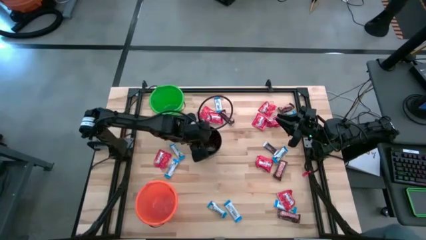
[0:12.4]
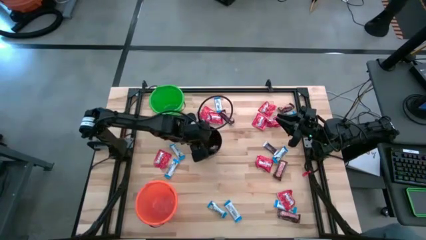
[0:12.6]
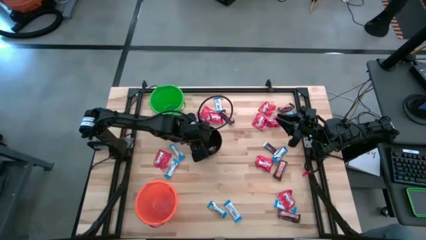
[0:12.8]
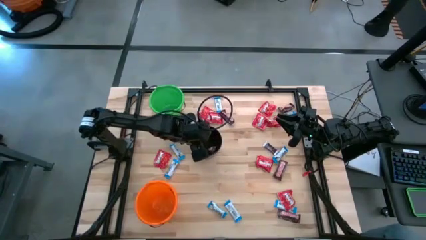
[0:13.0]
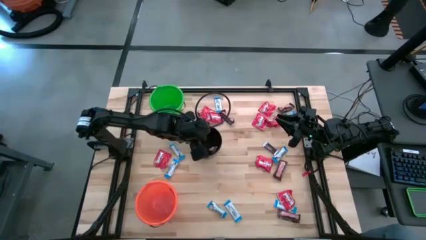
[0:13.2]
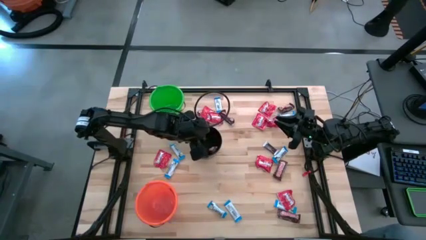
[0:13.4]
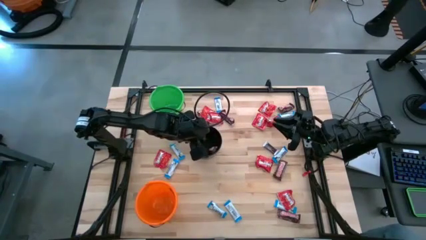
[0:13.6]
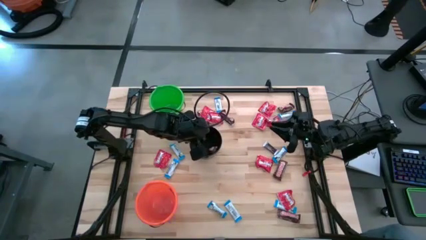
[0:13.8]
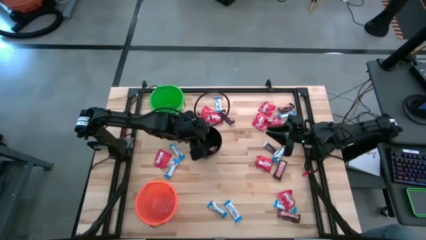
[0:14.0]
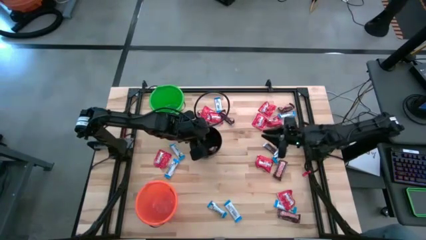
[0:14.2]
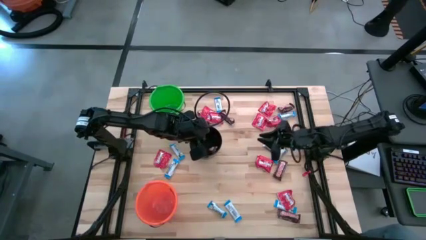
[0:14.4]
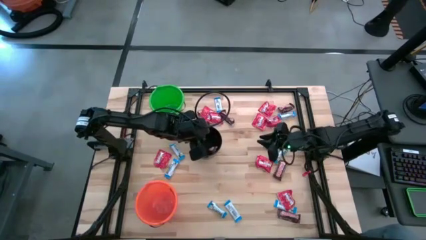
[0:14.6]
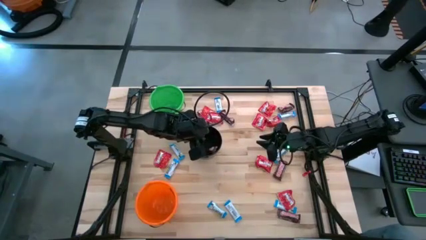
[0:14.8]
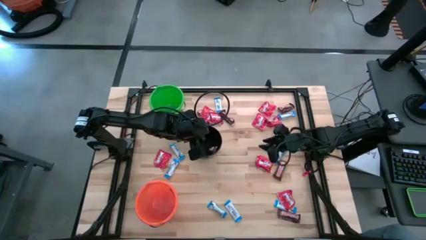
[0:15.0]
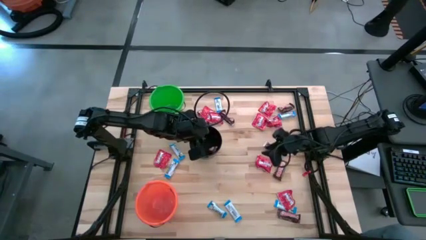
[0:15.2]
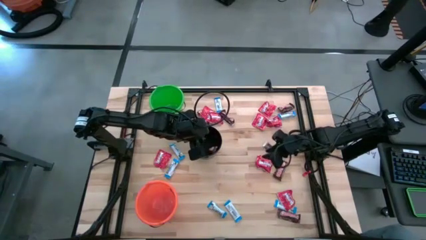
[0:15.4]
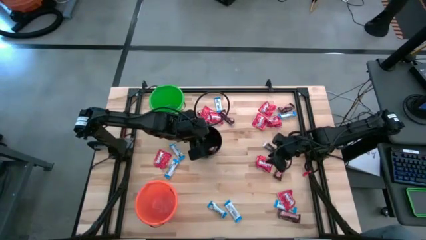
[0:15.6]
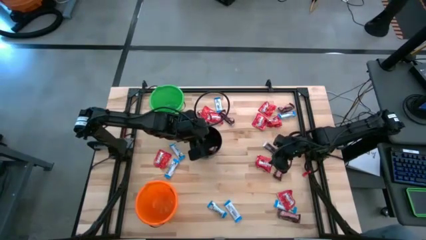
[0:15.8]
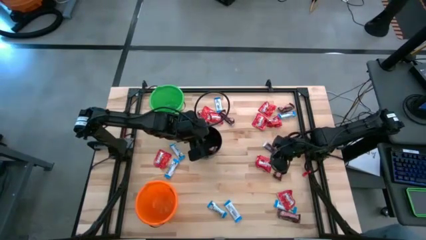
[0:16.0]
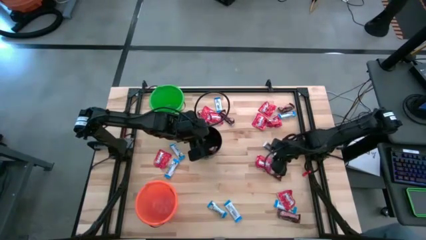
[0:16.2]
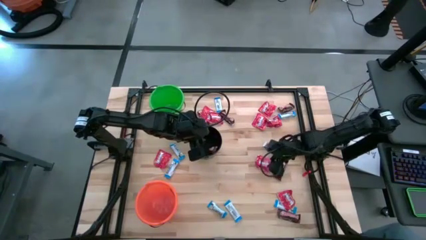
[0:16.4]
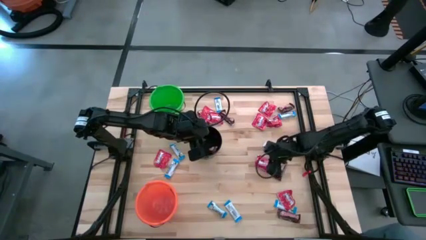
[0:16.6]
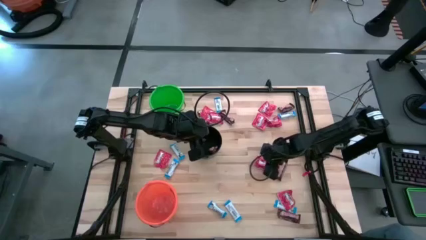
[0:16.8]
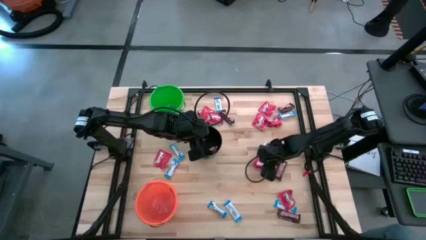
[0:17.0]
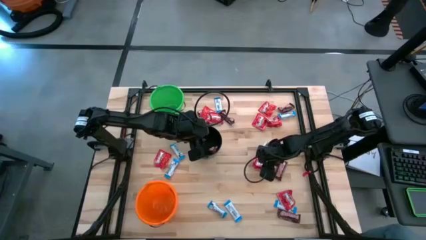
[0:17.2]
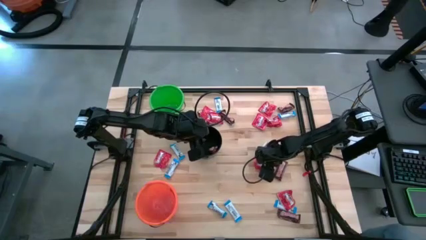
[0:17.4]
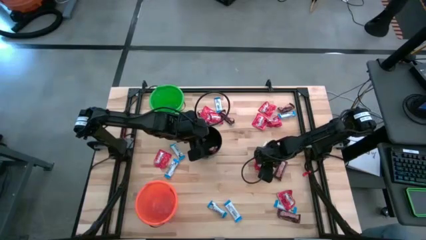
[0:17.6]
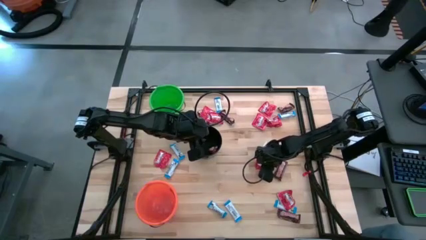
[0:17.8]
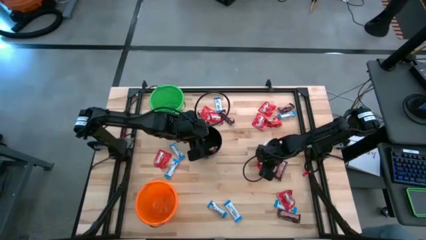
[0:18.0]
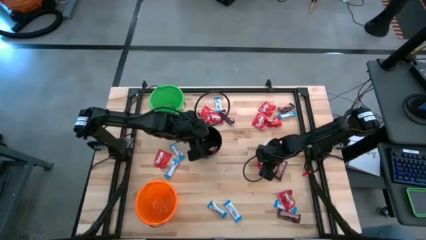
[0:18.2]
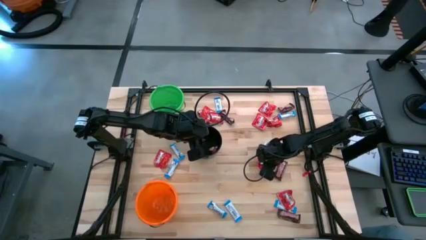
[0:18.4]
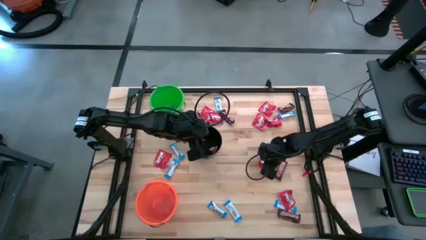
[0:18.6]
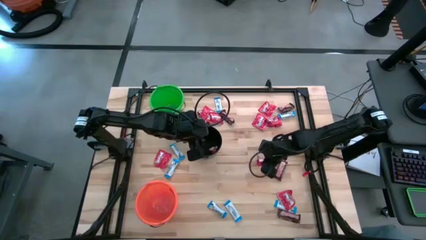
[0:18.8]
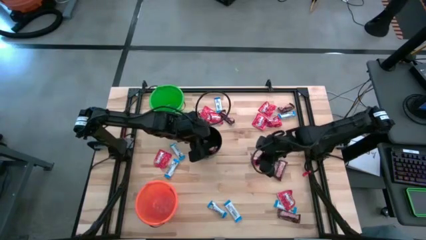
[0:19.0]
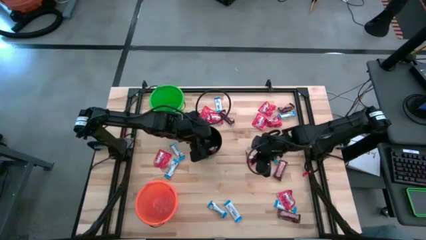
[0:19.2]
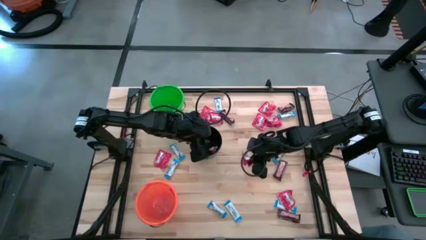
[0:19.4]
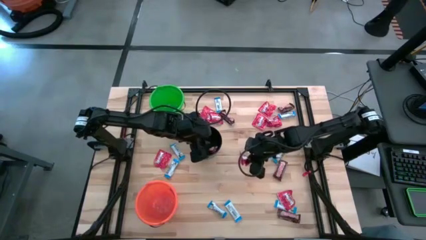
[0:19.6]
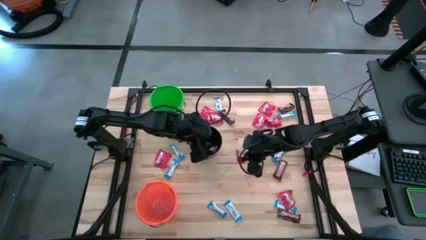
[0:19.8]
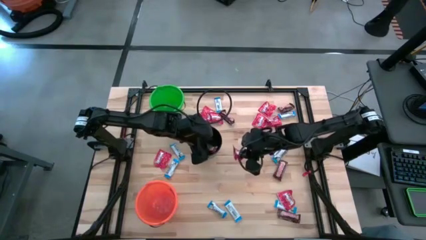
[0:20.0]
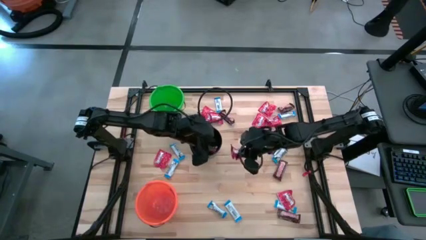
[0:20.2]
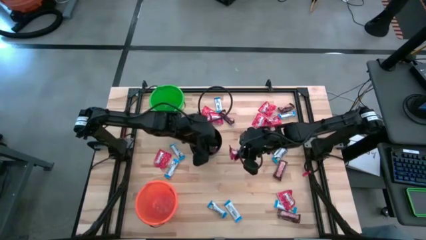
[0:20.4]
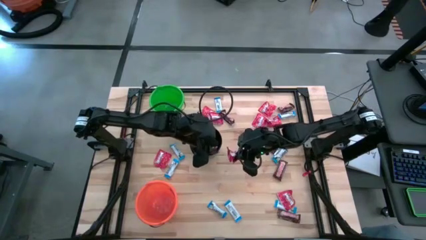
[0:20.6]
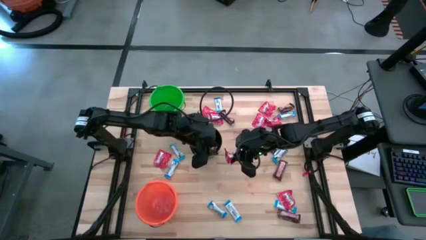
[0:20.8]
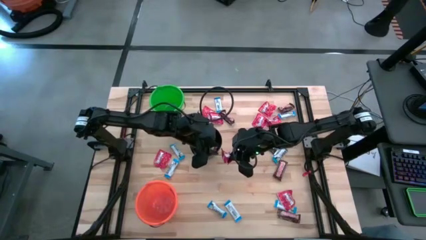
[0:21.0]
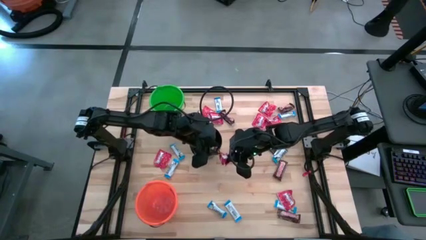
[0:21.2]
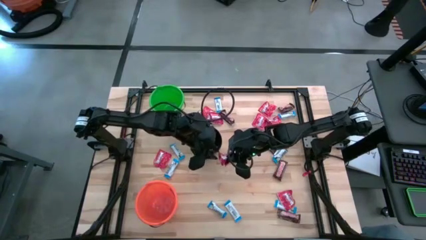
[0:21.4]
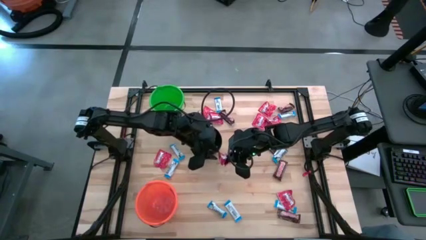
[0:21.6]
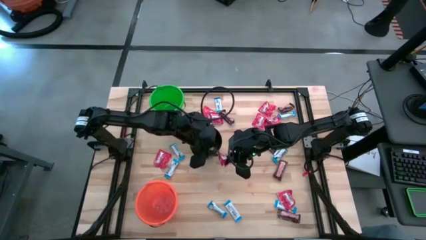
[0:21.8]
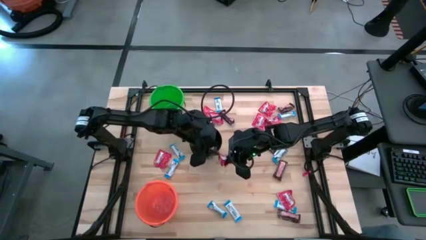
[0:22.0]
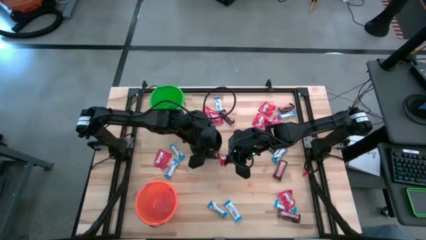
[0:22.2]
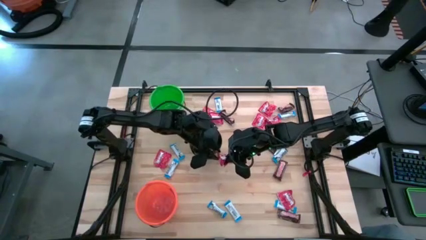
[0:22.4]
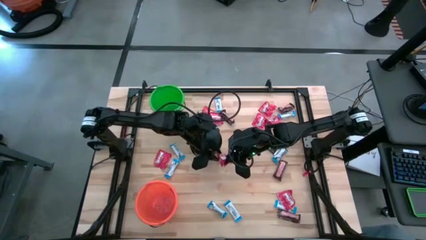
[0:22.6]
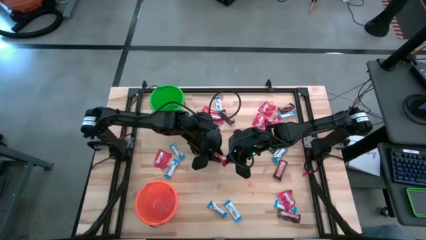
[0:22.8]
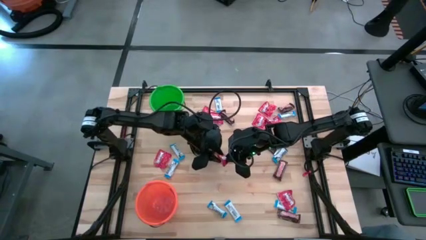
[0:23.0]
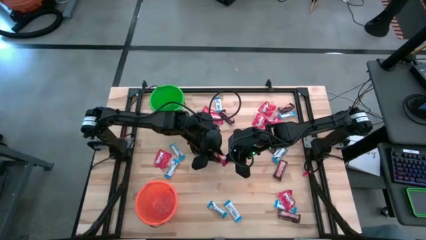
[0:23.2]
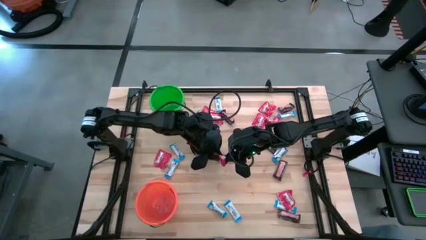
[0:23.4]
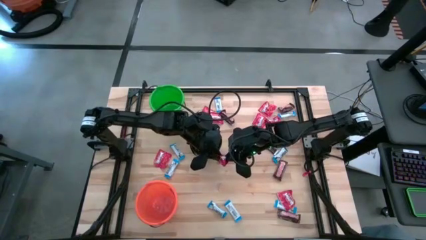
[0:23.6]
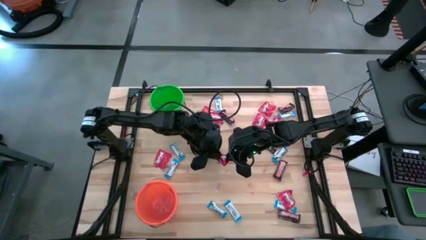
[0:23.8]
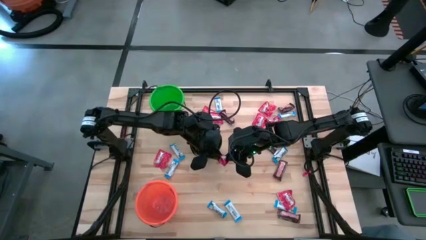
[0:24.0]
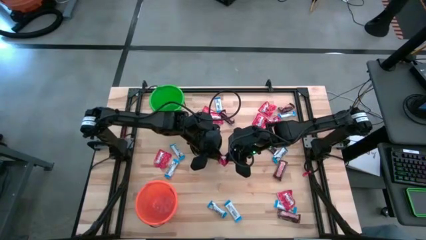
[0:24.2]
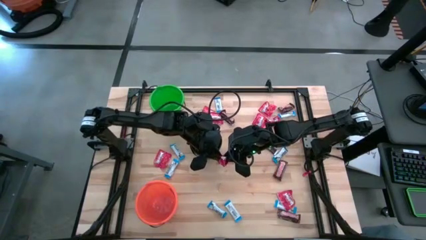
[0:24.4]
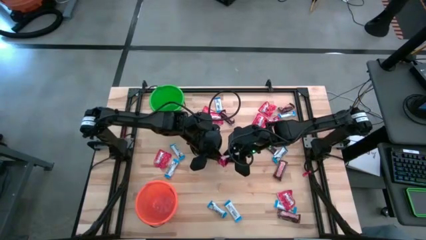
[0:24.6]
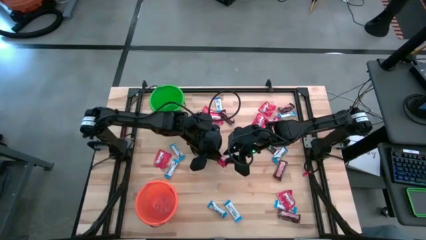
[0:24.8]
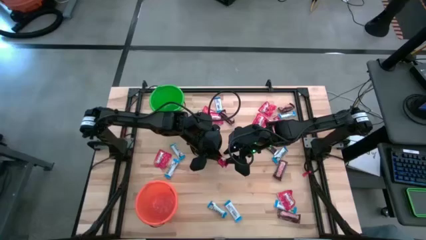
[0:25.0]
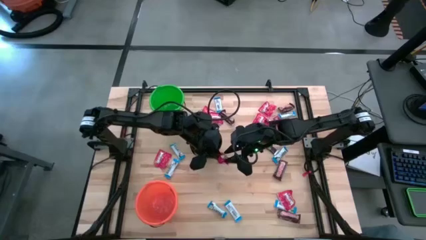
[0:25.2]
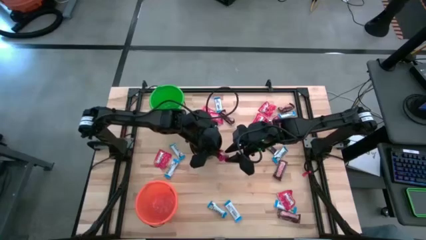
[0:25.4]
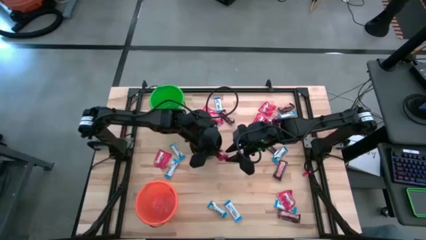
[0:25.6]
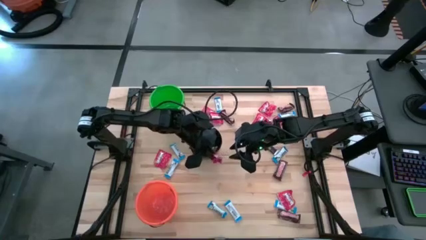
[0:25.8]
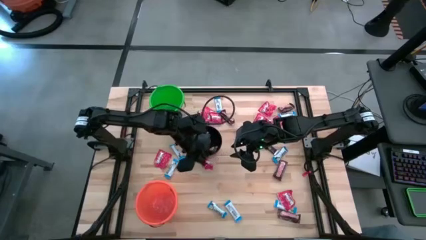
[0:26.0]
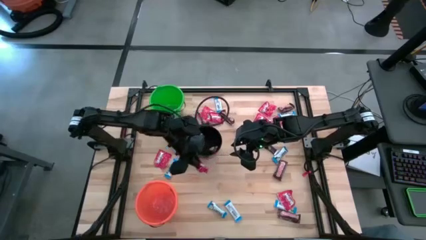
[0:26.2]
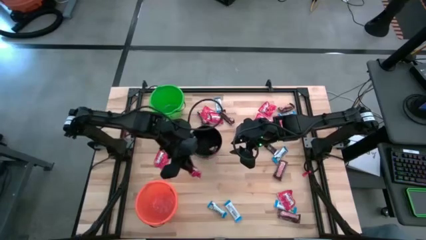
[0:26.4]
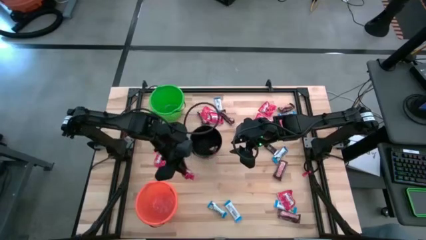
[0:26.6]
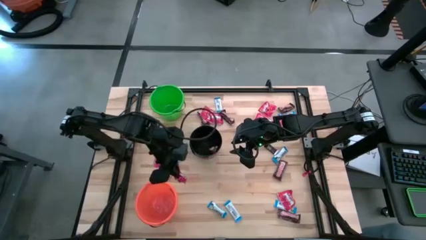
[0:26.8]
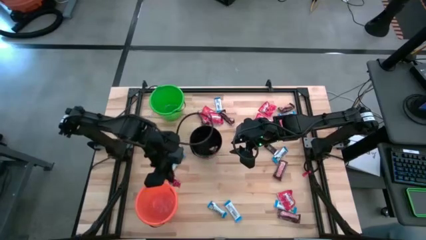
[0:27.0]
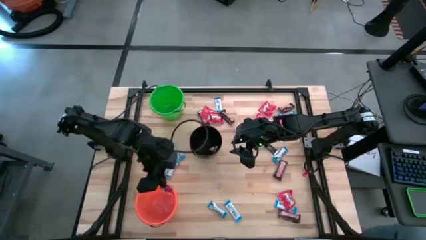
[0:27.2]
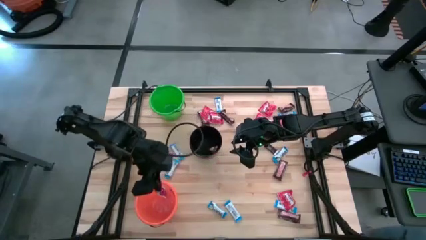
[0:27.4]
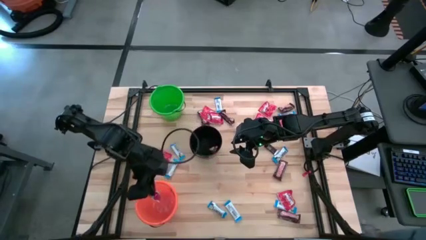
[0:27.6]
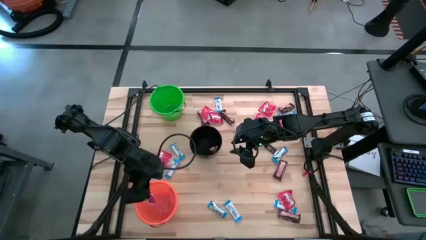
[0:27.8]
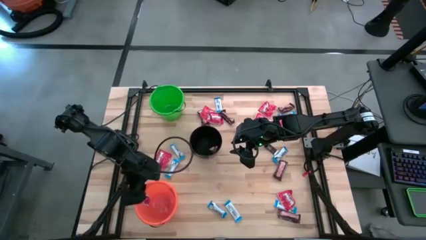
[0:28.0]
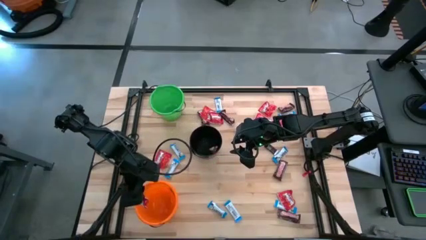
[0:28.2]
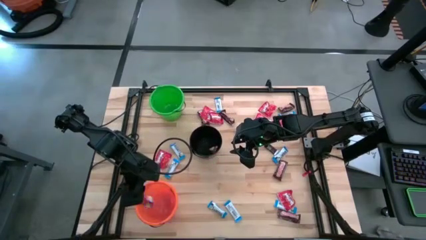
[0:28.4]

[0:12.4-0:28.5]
Task: Sort candy
Put the red candy pack into the orange bucket
